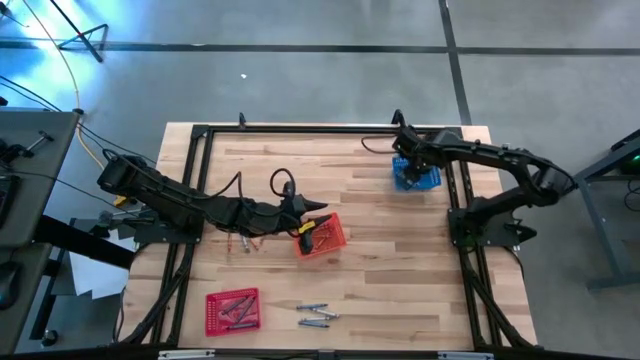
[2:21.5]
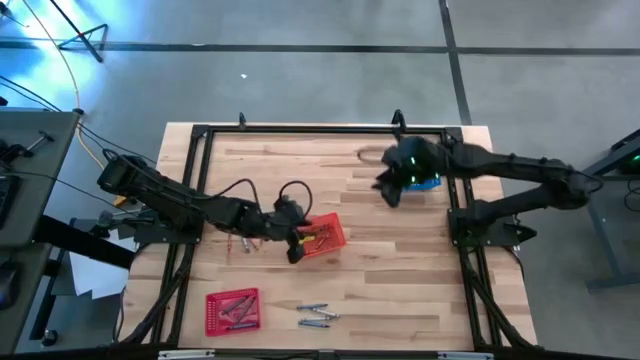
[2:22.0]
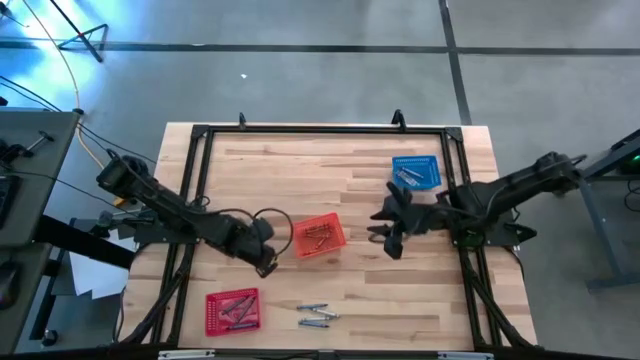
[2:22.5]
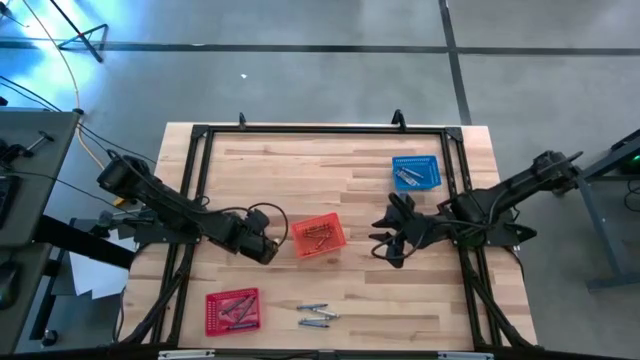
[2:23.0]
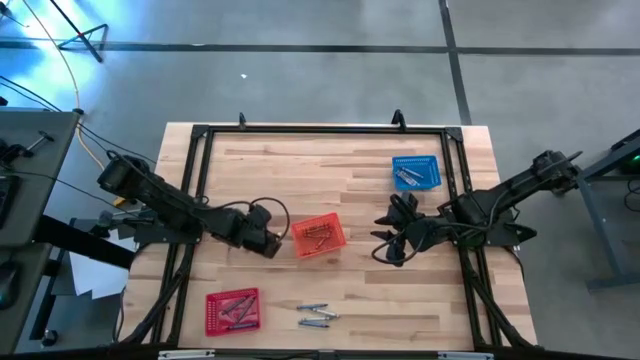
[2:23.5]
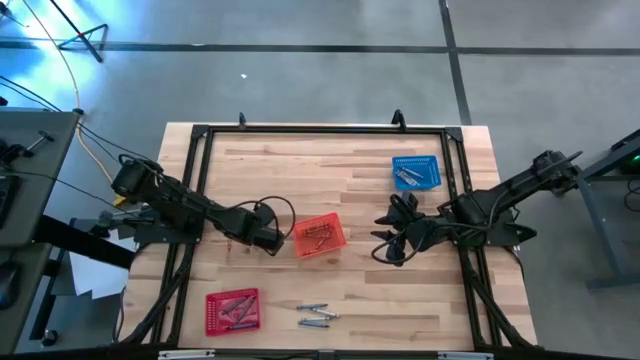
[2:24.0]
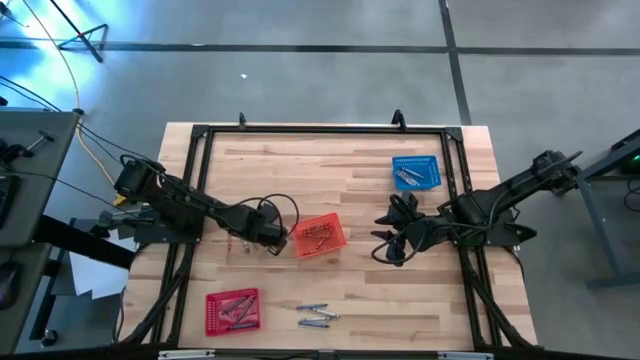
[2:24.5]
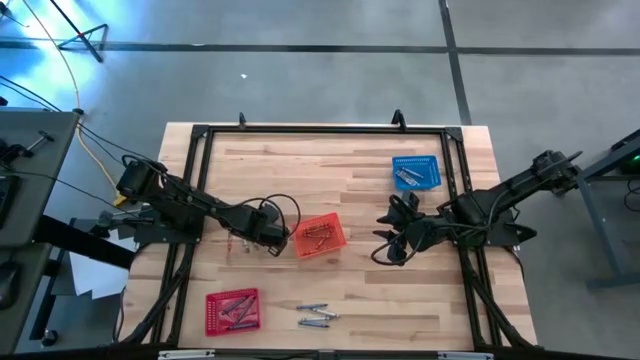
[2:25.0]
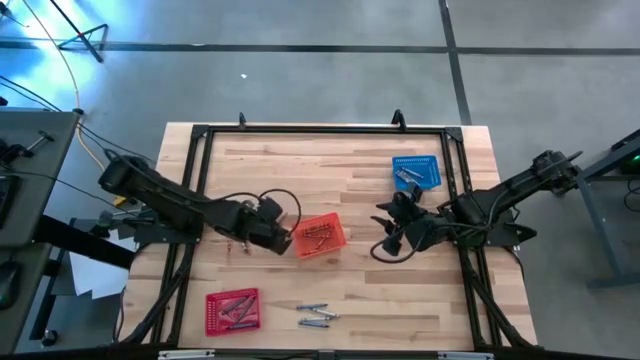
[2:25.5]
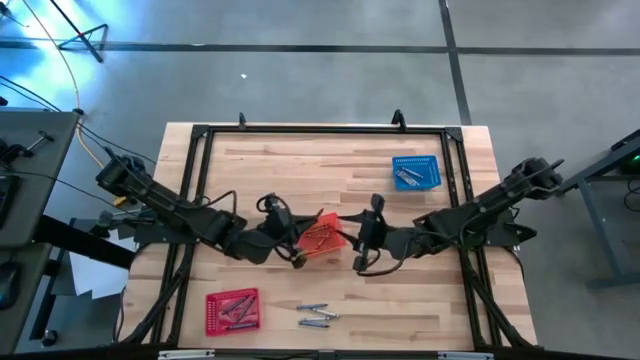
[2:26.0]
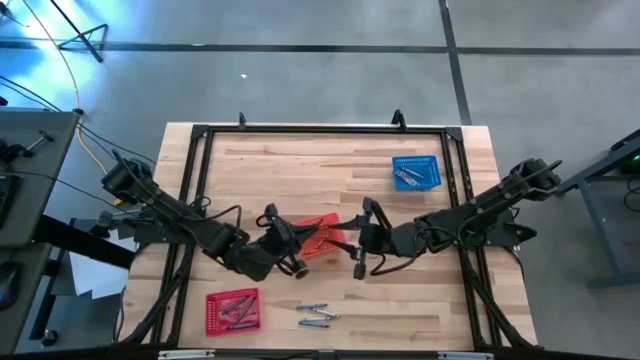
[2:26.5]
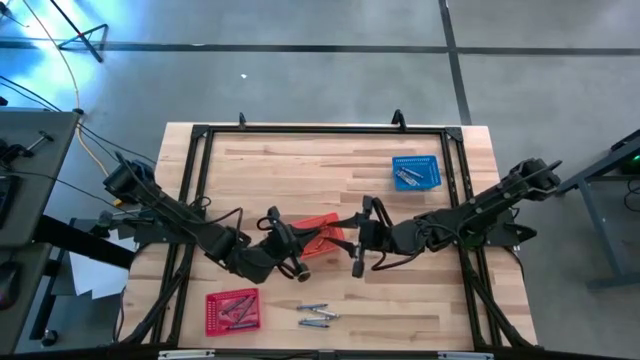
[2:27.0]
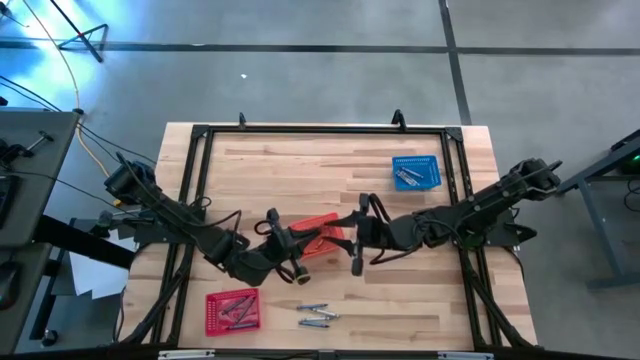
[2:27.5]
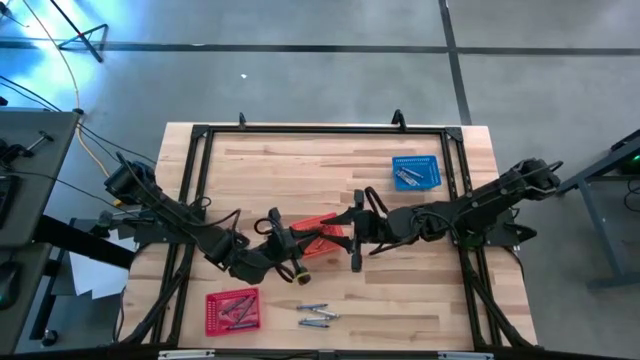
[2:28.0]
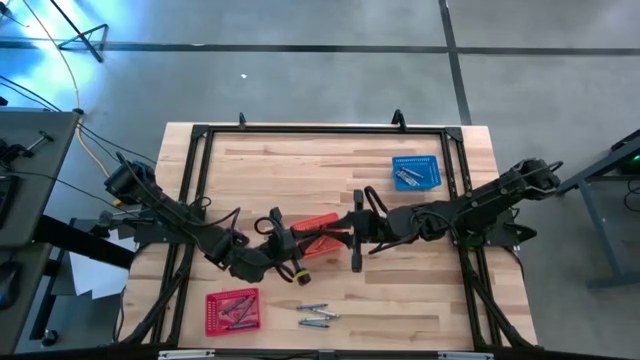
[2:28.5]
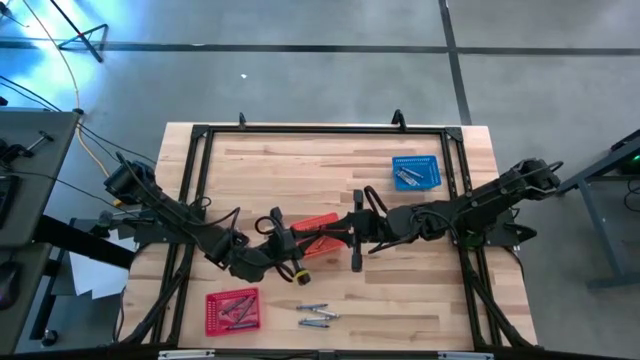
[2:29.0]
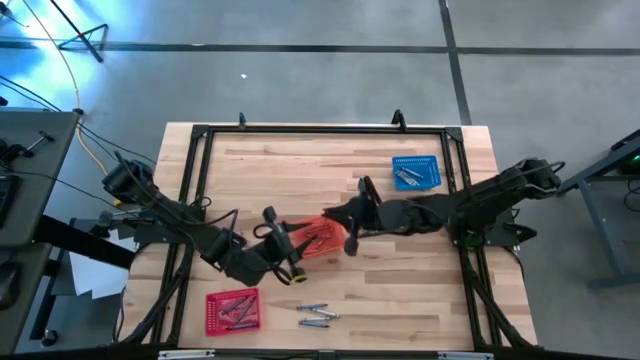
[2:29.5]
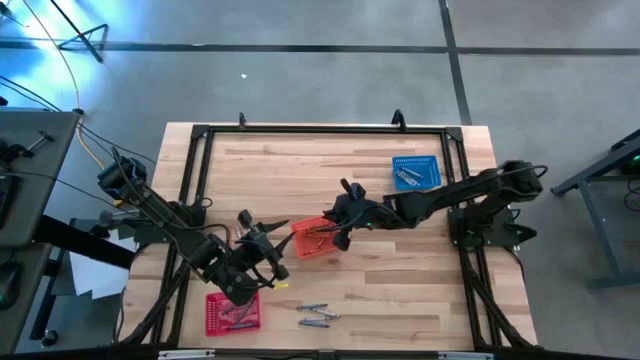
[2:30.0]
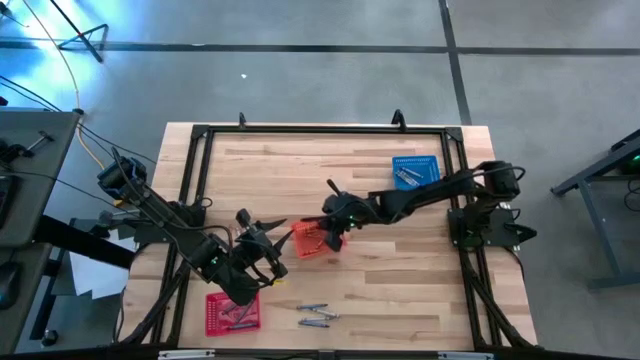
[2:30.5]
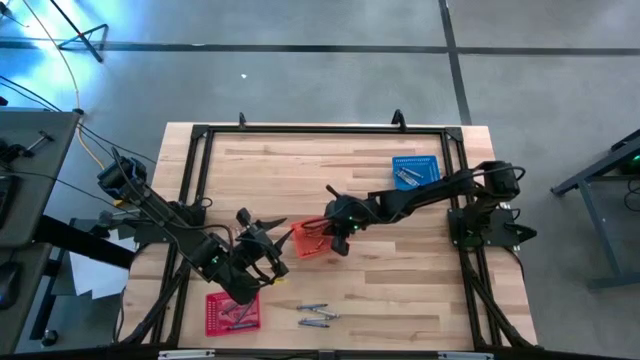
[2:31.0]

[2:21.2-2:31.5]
Task: Sort crayons
Put the right orange crayon into the orange bin

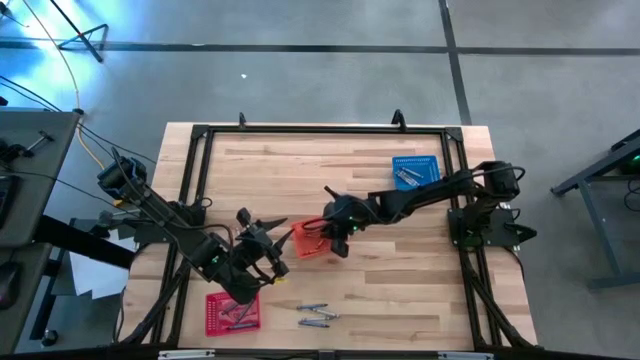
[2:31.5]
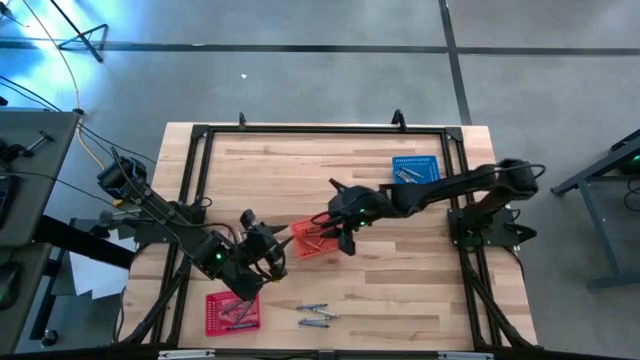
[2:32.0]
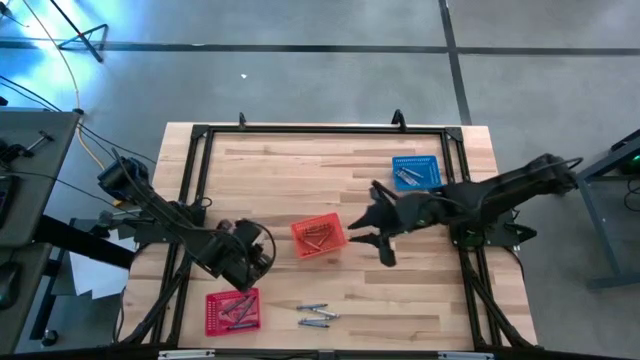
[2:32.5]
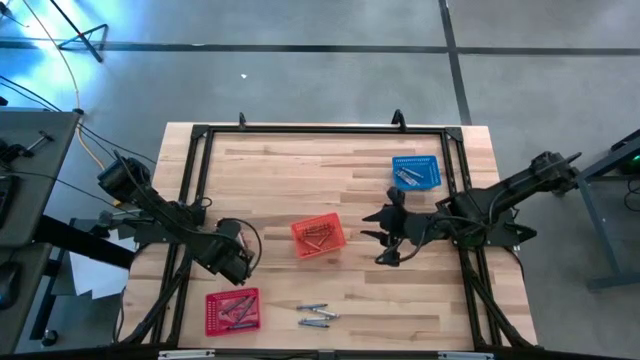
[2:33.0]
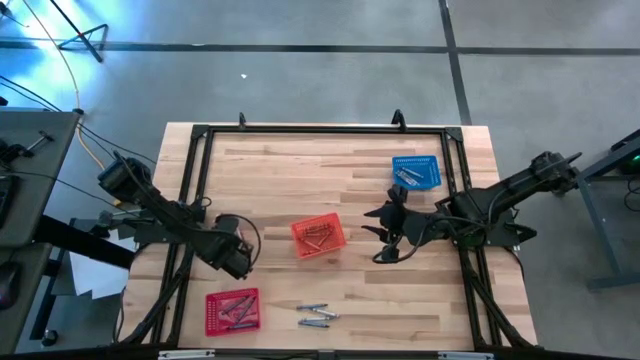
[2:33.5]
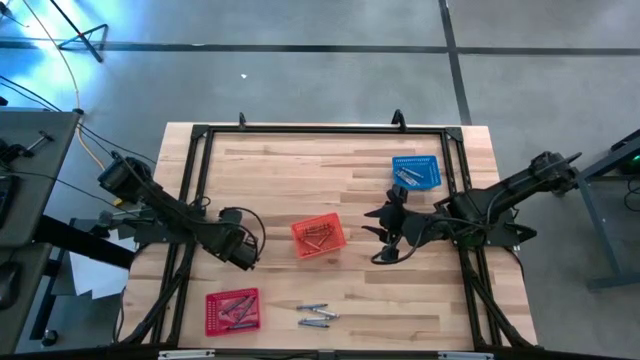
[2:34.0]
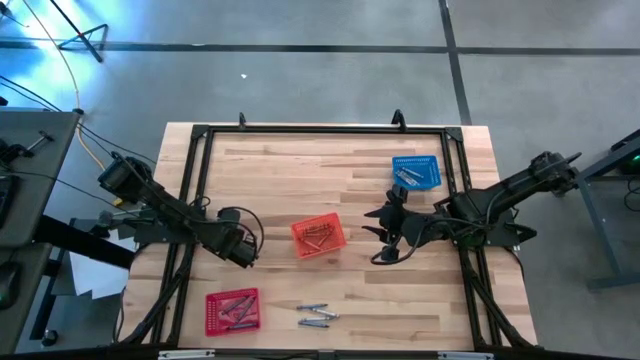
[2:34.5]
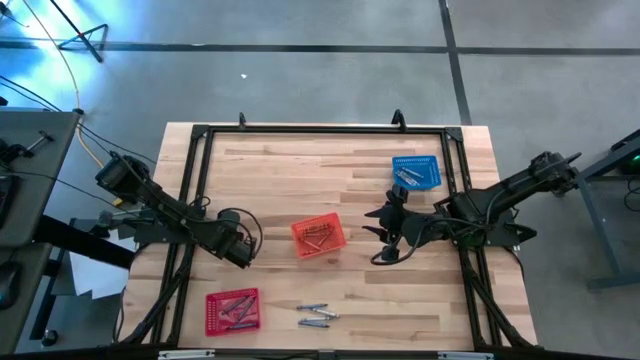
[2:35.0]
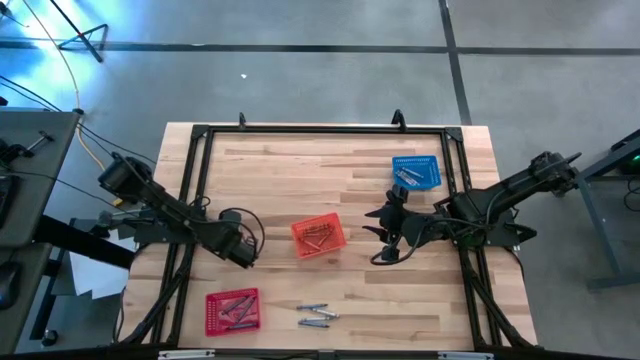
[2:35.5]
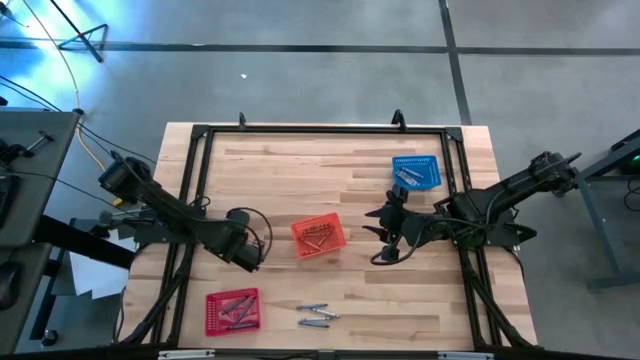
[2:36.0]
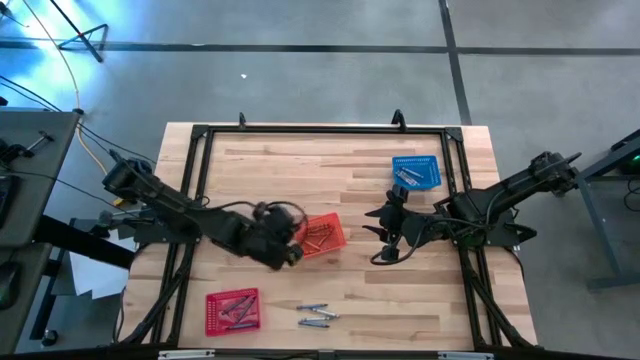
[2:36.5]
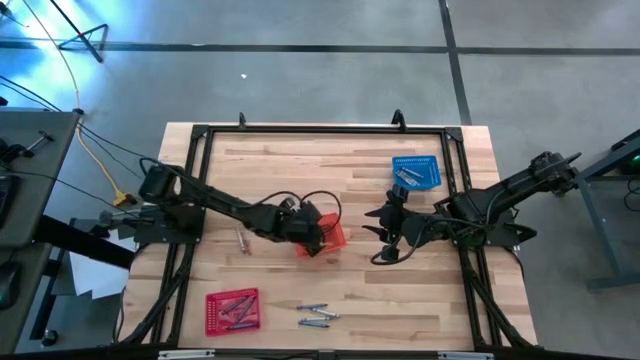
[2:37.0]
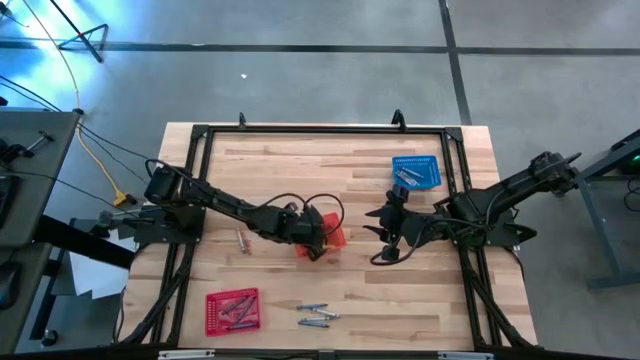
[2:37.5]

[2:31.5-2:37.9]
Put the left orange crayon into the orange bin

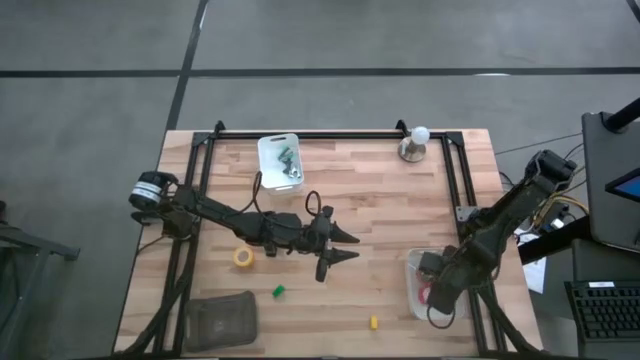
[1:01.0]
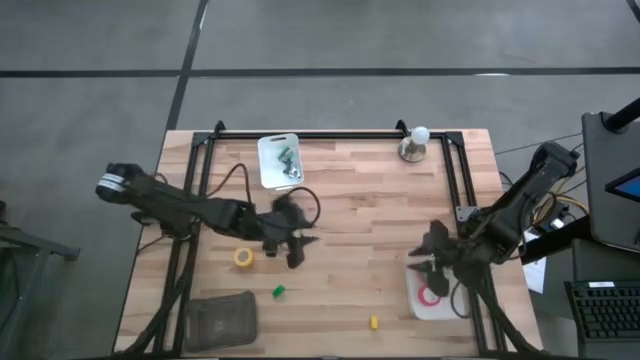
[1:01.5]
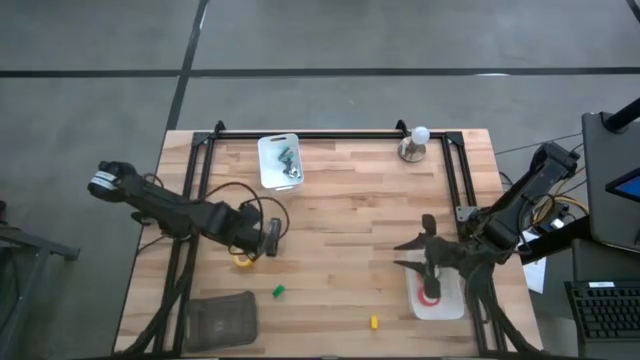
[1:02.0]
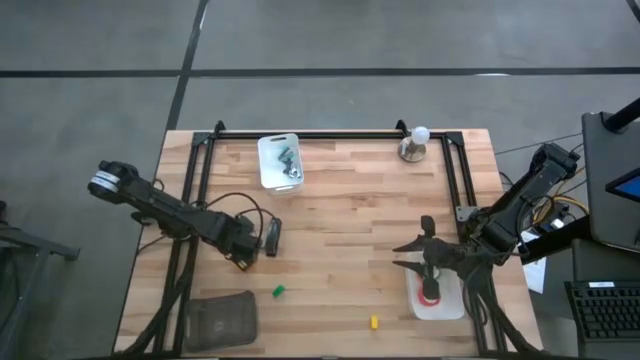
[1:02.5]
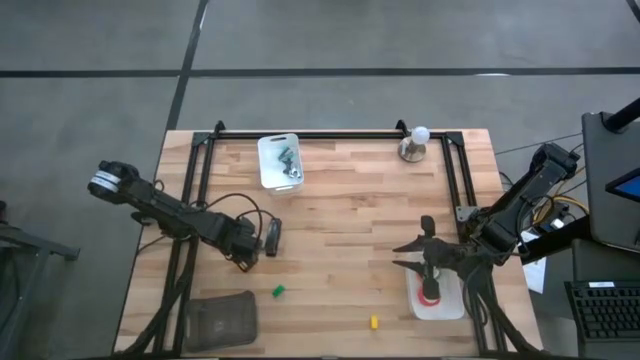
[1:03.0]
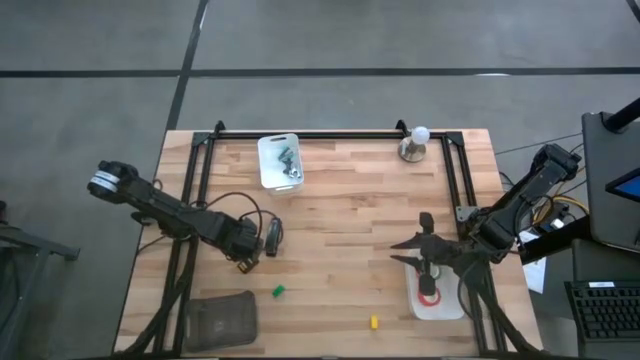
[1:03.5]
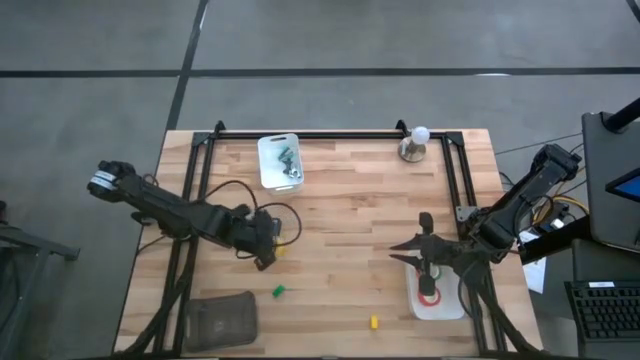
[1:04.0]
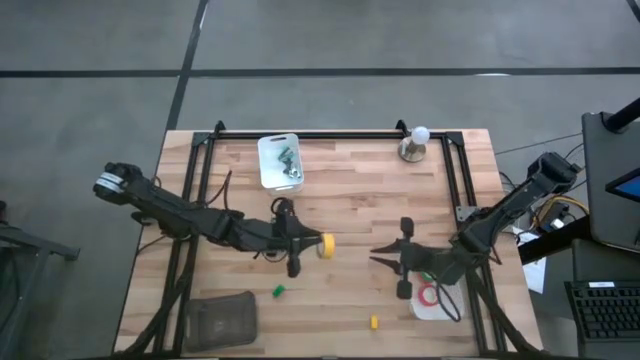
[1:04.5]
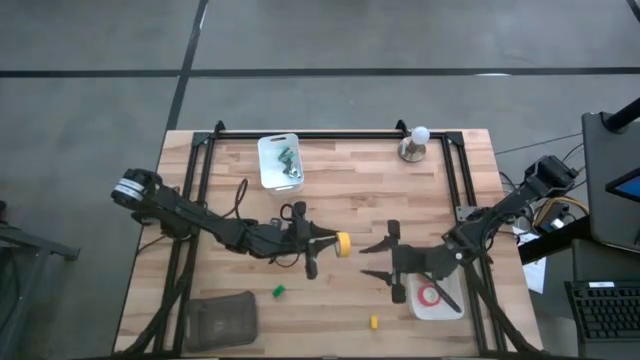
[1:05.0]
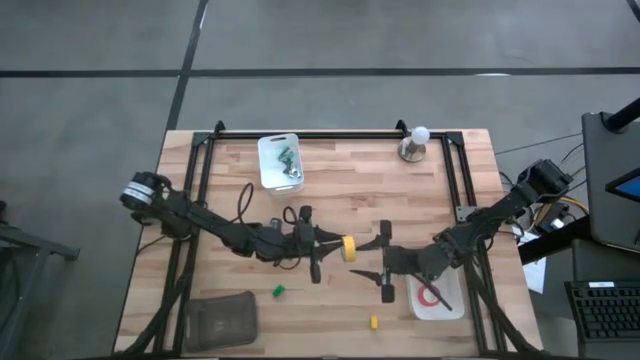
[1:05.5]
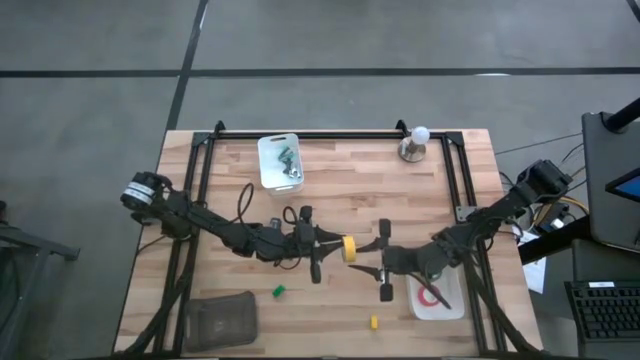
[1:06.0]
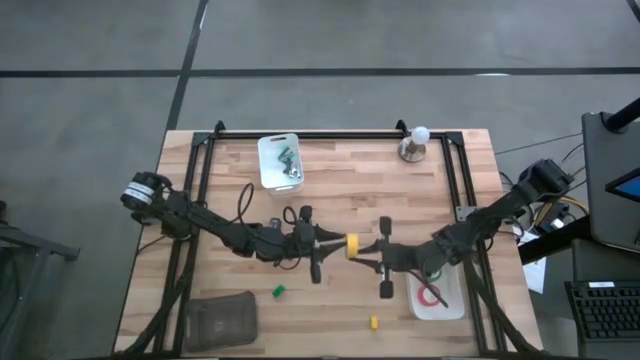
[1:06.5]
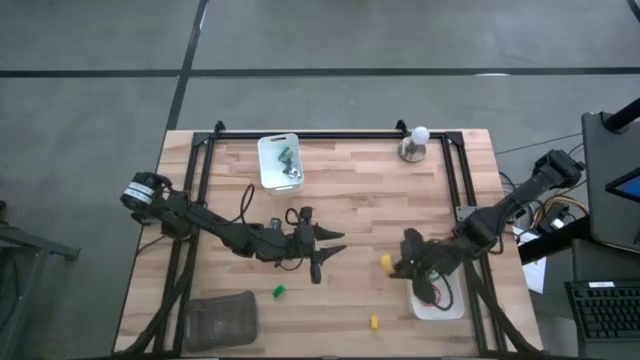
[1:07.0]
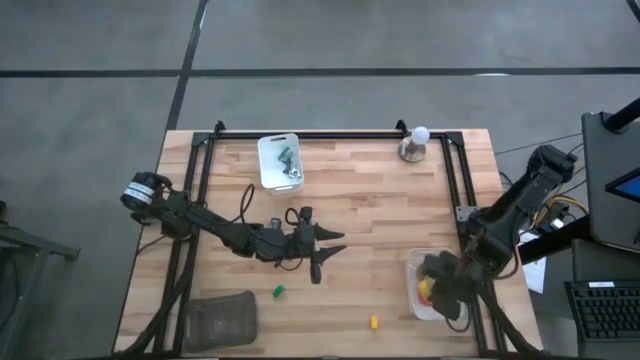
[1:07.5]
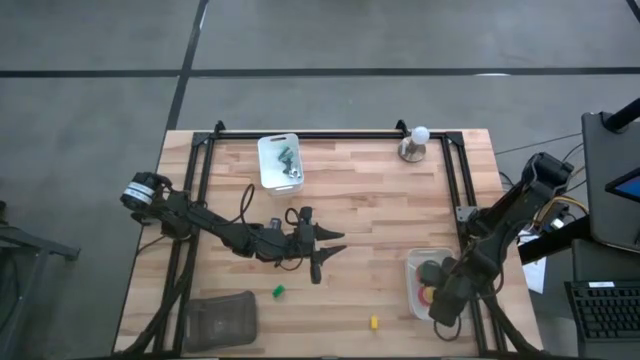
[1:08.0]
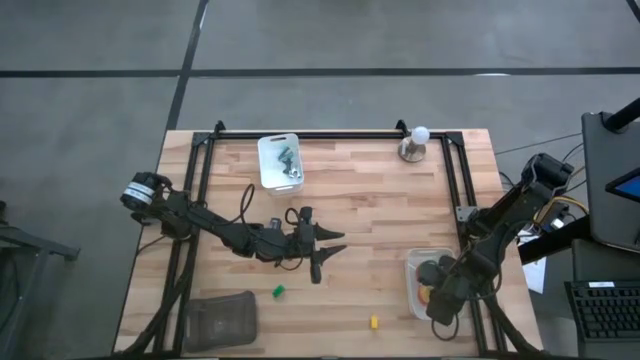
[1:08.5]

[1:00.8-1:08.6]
Task: Pick and place Stapler, Stapler remover, tape
Put the yellow tape into the bottom white bin
